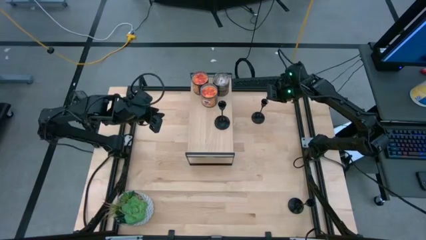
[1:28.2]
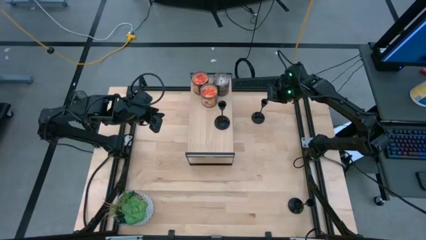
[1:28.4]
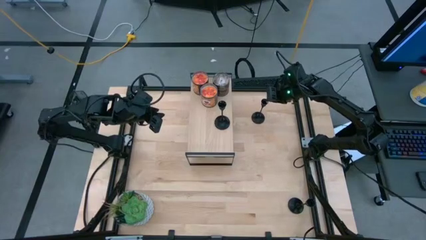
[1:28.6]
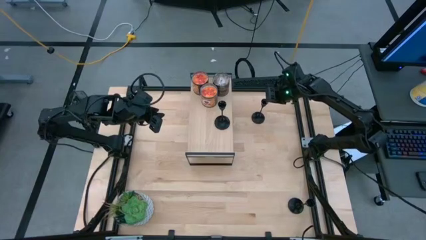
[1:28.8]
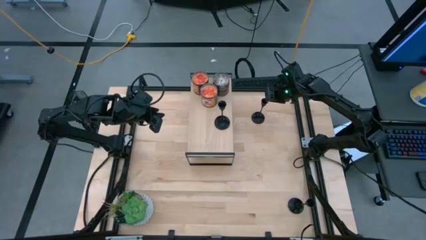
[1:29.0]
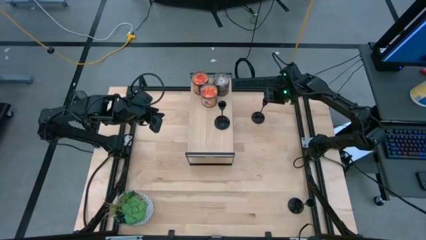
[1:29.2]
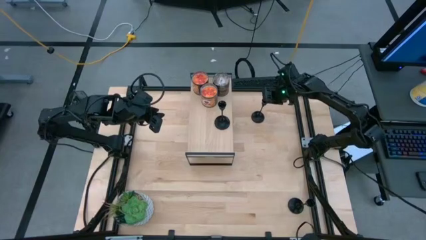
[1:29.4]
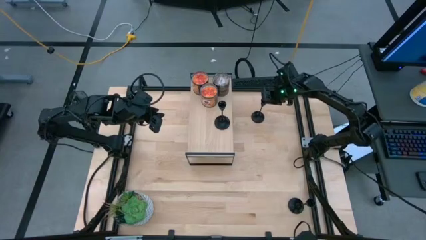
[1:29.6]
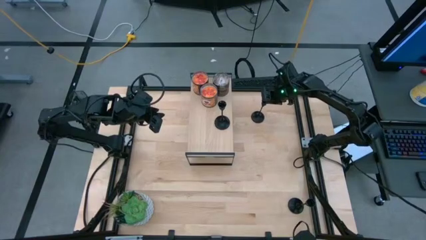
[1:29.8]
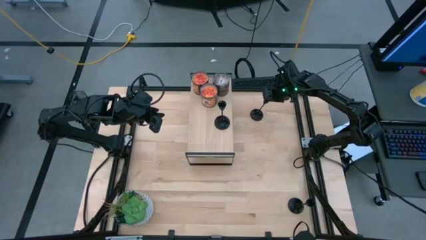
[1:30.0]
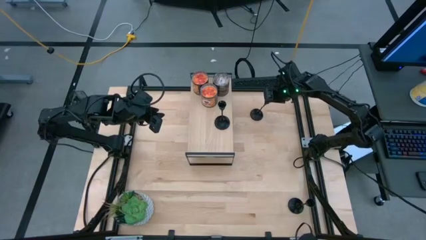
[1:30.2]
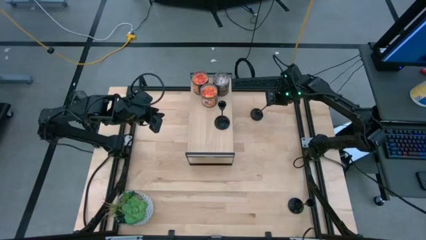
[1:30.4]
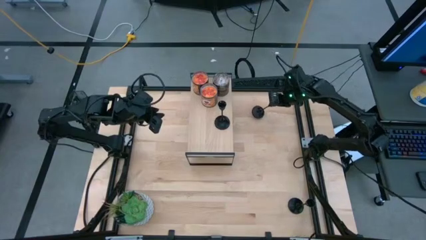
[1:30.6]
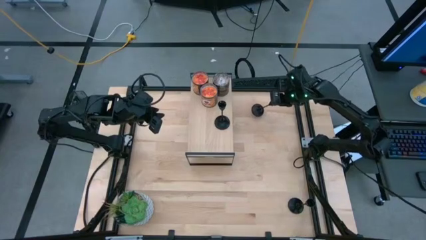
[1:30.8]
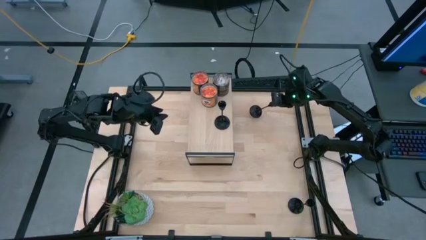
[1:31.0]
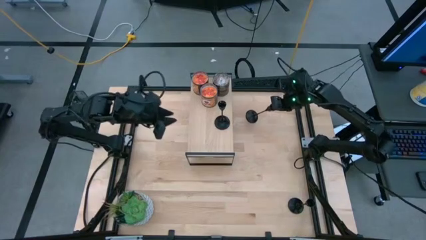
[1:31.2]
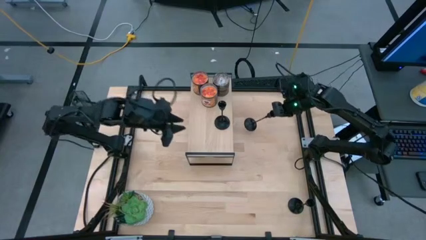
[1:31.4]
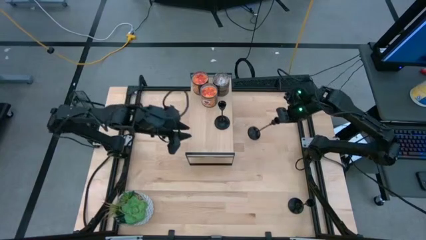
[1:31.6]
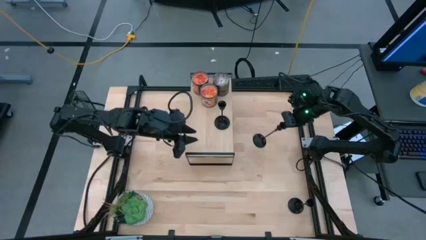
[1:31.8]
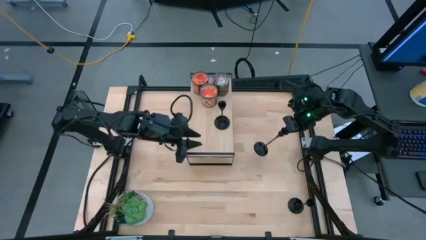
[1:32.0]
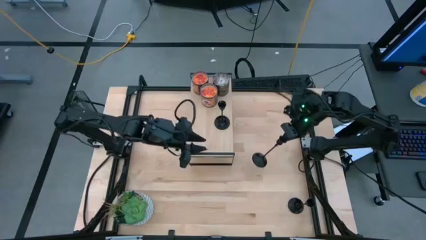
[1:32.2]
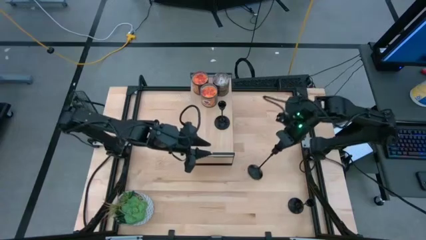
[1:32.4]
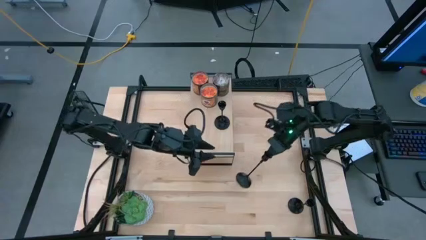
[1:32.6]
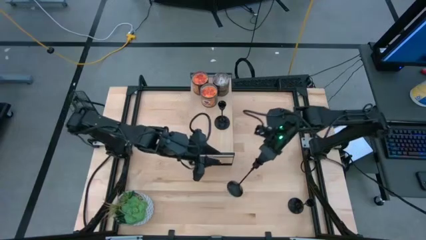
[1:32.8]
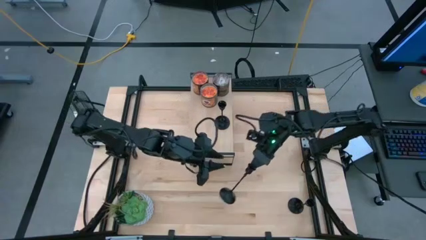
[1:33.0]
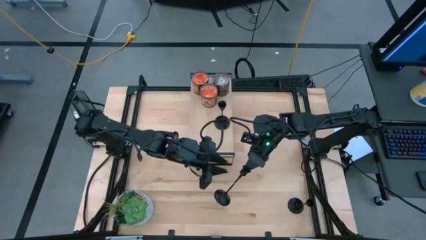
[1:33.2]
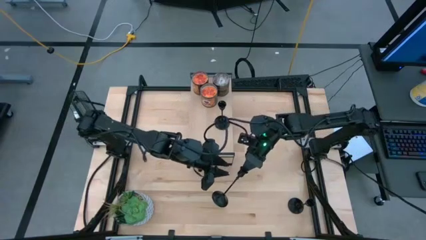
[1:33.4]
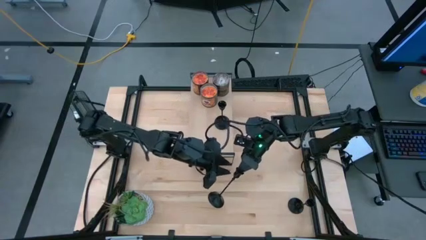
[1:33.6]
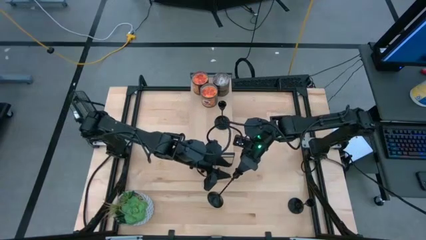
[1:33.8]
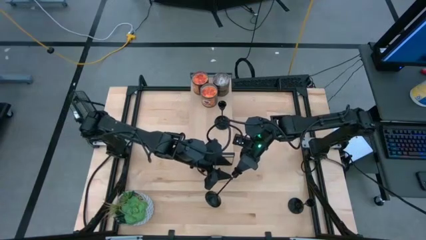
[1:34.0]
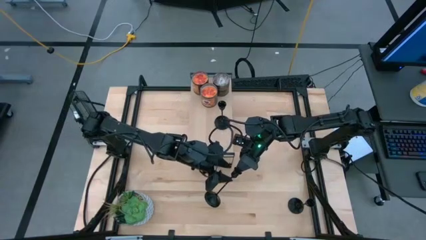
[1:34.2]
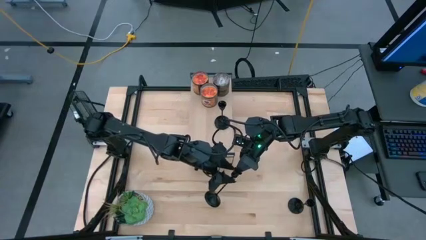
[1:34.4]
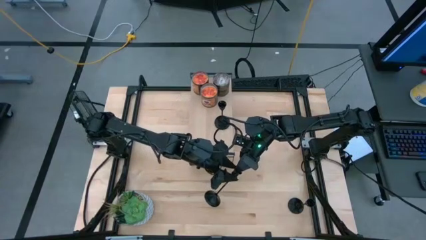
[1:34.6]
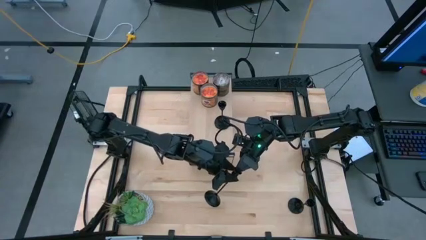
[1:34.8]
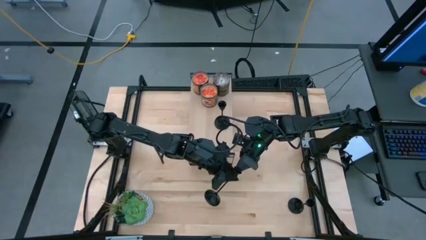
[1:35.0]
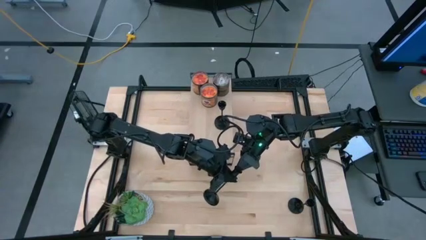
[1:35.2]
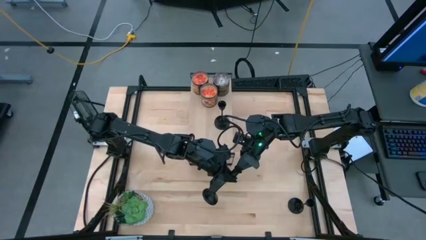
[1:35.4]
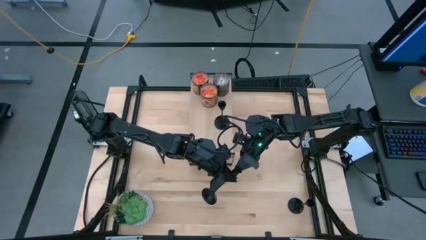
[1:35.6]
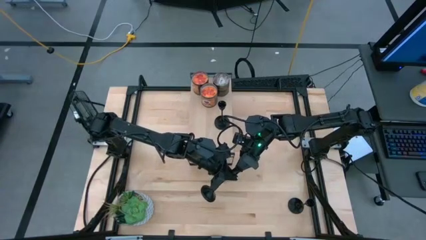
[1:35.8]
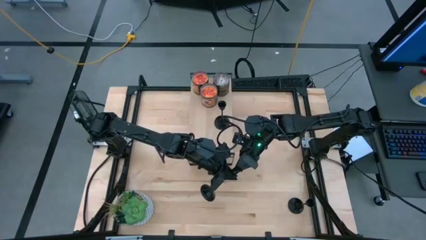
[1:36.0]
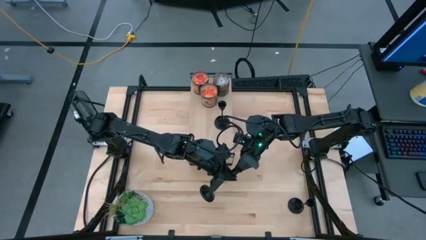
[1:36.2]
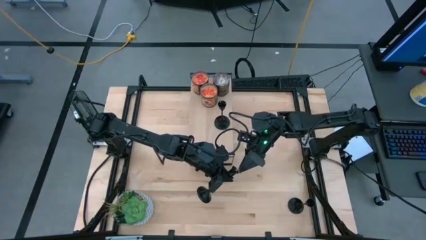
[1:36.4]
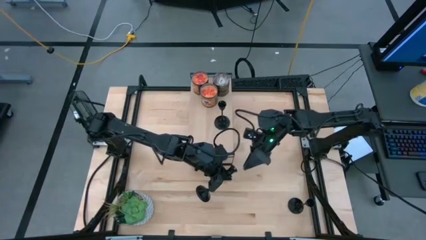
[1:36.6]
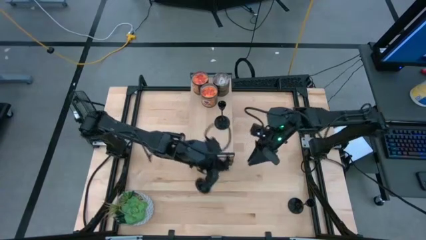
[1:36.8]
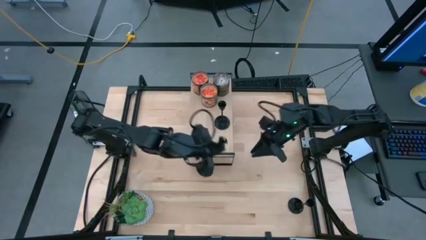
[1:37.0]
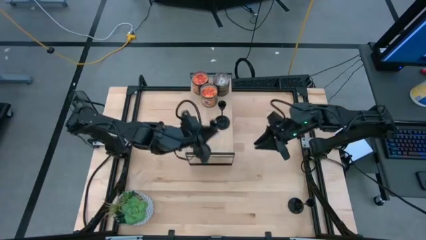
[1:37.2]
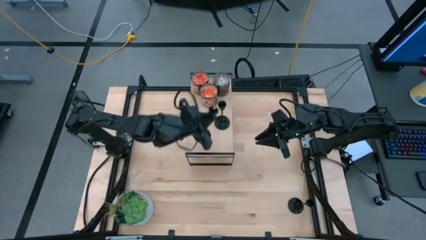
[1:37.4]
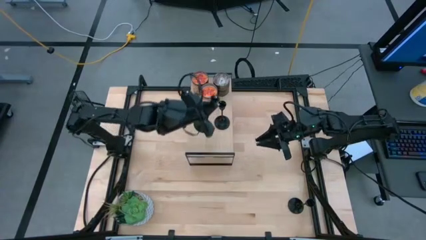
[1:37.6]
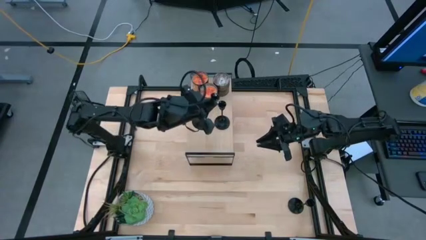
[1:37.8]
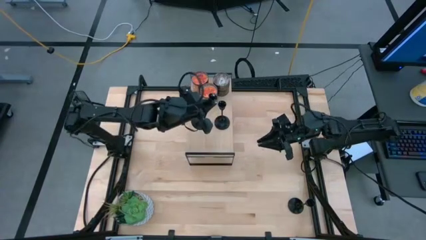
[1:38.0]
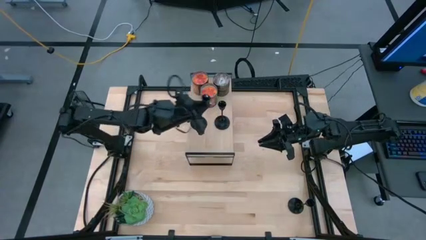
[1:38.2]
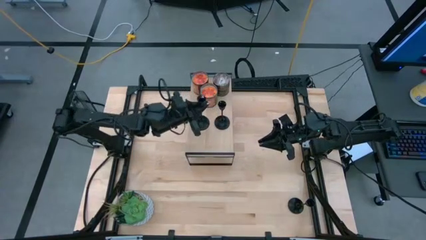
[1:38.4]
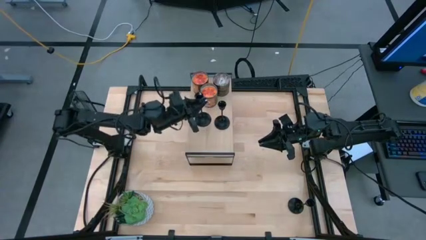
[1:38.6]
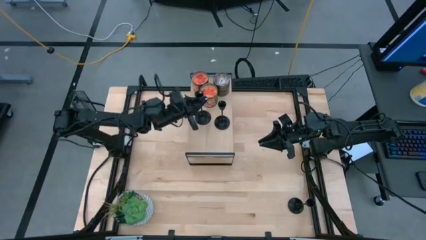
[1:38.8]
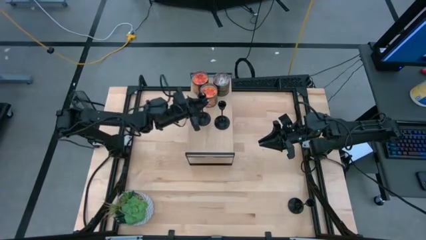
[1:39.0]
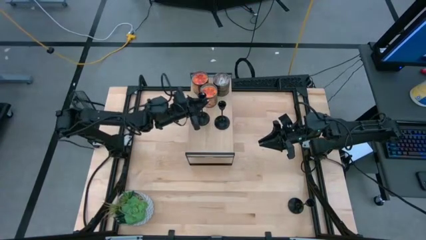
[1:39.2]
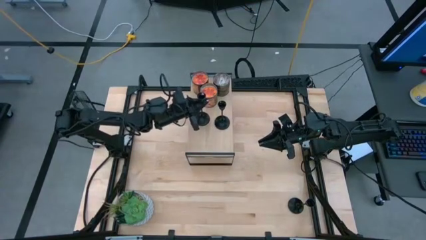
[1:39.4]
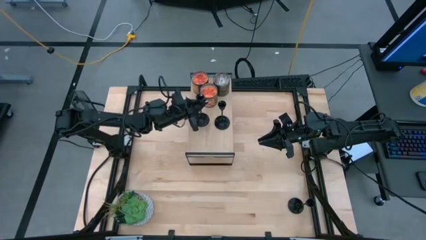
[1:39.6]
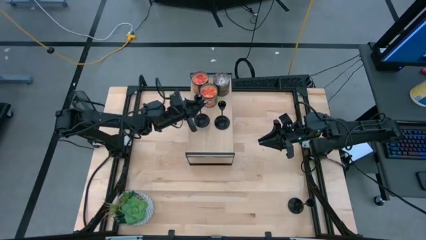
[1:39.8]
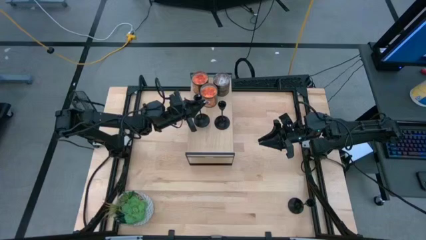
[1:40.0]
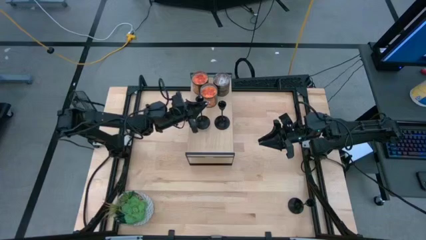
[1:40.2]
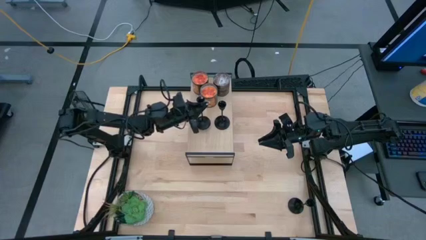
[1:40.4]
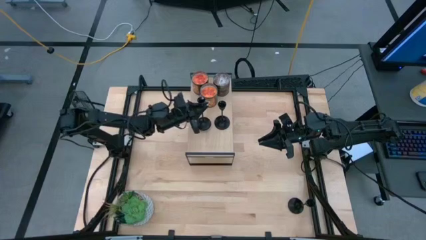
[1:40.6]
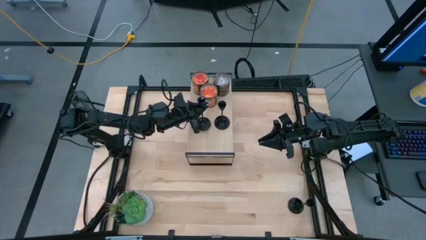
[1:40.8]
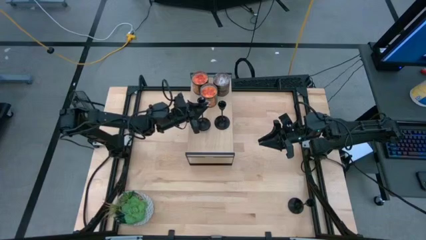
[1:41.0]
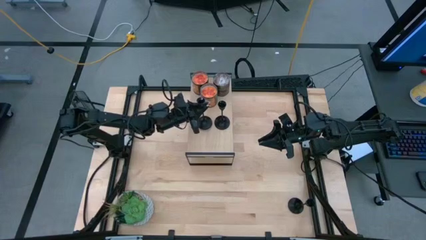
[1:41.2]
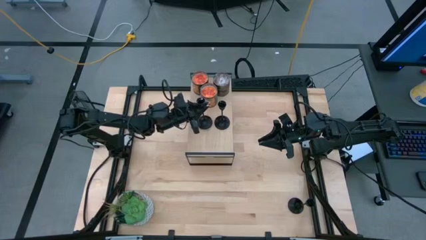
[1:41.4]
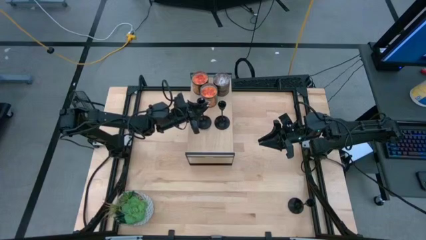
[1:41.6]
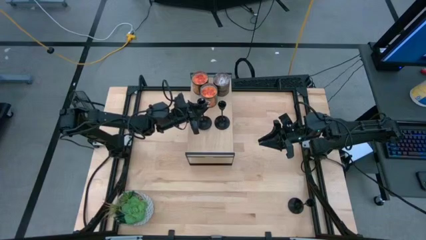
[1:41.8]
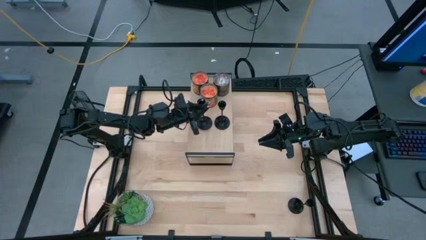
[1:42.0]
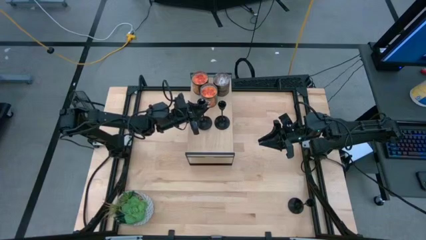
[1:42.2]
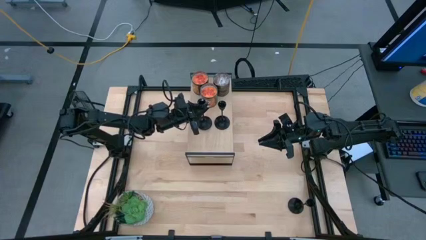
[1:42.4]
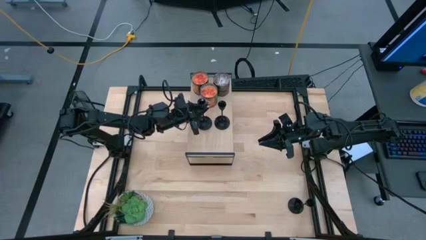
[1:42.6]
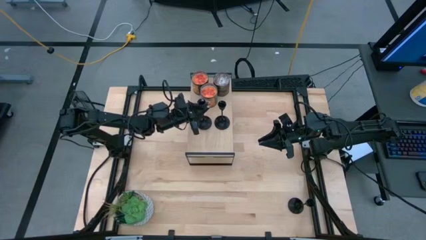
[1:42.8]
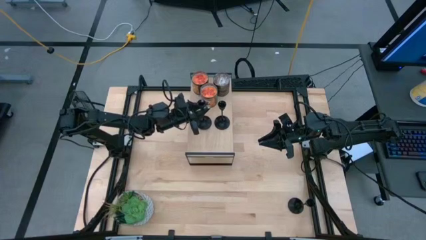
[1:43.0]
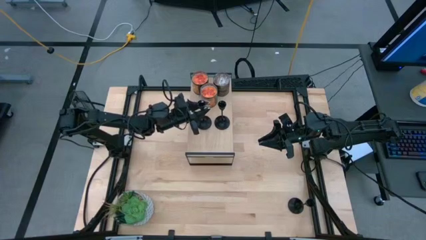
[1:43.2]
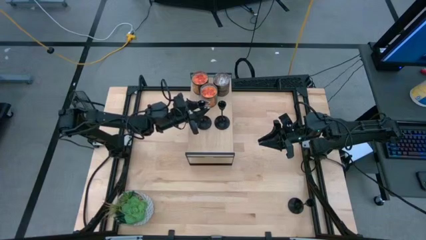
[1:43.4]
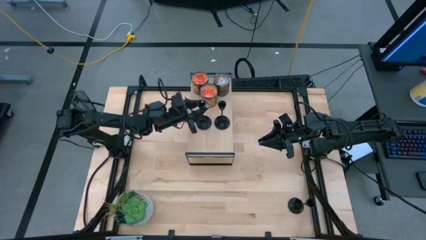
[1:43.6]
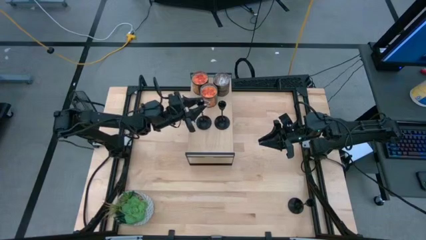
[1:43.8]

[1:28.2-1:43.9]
Task: Pick & Place candle stick holders
Align the top black candle holder with the black candle holder on the shelf

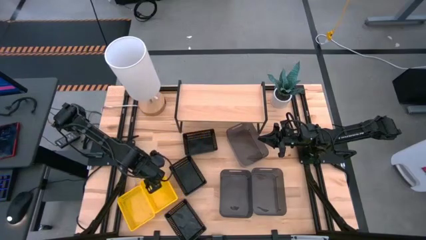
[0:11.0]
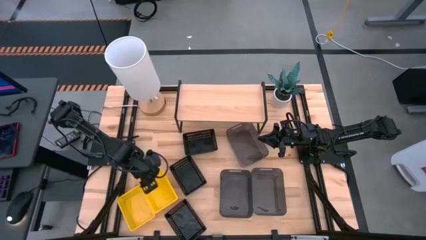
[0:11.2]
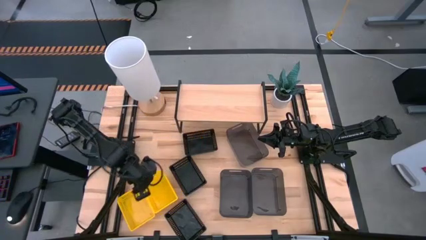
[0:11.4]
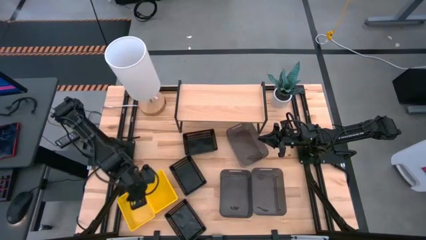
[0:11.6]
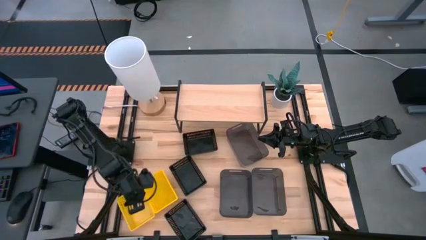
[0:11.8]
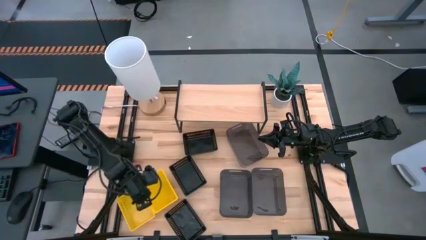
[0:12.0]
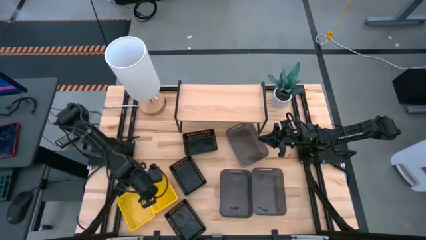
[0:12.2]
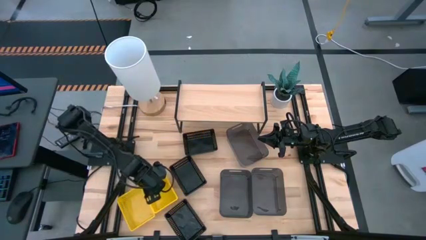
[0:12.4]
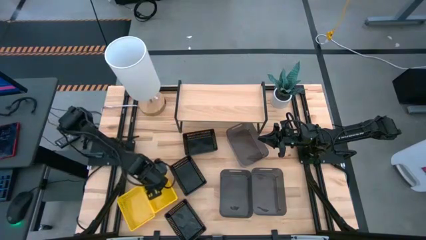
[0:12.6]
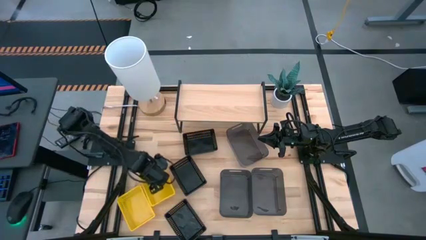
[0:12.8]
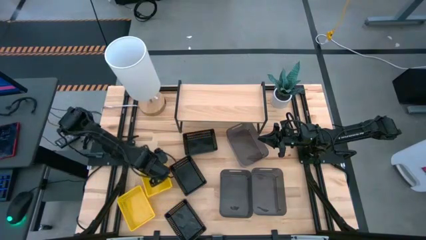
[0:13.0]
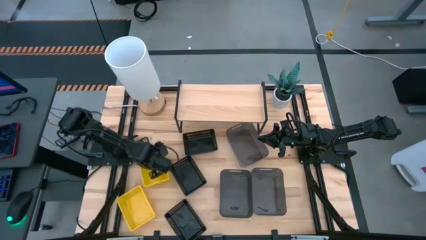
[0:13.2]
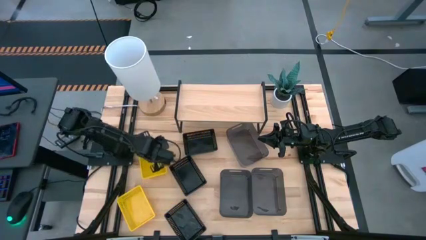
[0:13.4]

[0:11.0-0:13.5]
Task: Stack baskets on shelf by color
Move the yellow bins to the middle left of the table
